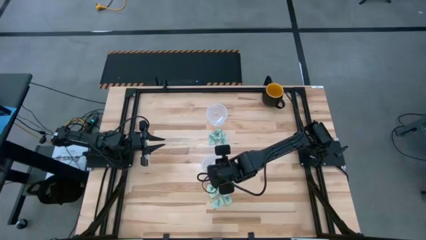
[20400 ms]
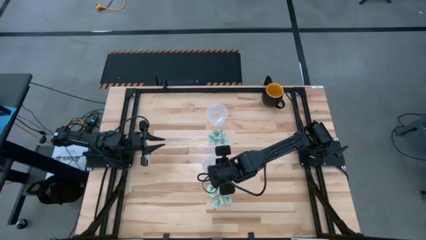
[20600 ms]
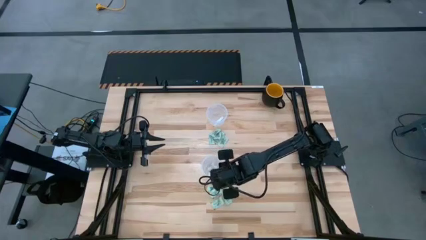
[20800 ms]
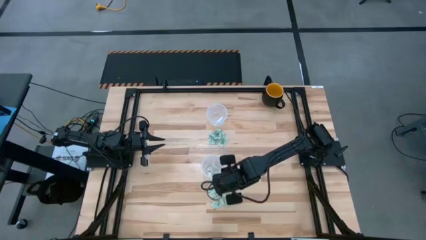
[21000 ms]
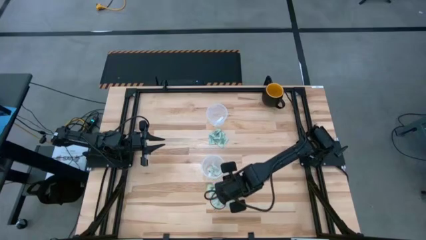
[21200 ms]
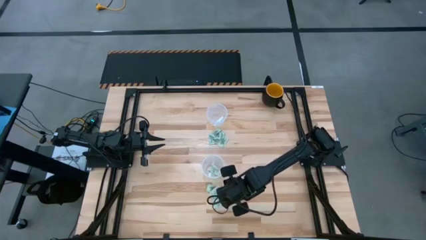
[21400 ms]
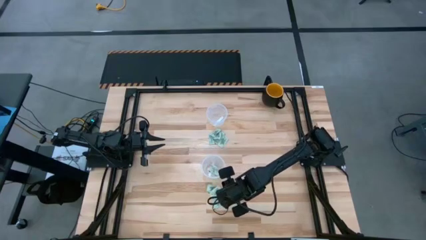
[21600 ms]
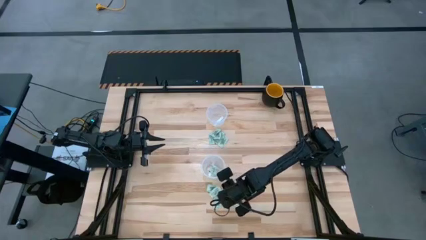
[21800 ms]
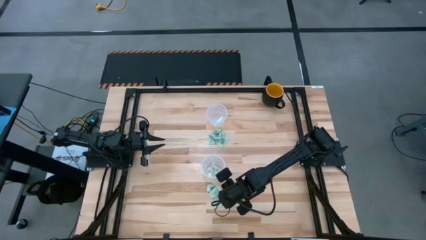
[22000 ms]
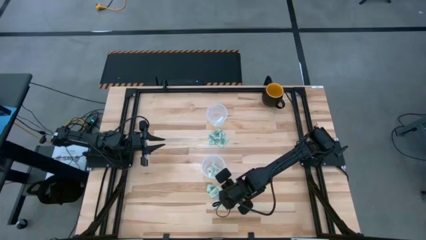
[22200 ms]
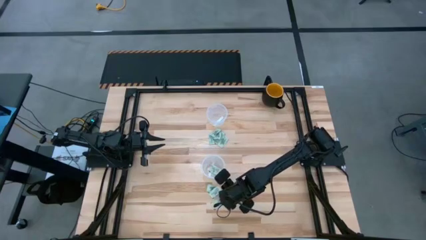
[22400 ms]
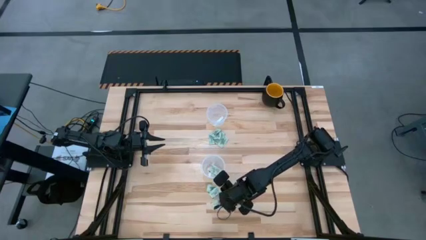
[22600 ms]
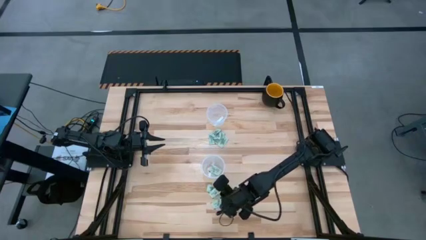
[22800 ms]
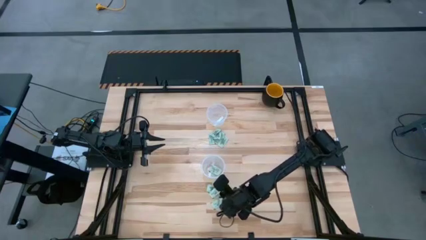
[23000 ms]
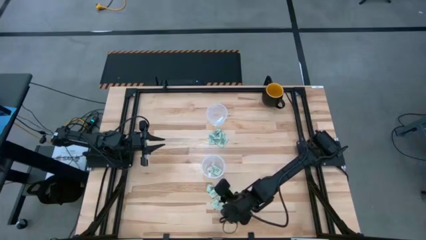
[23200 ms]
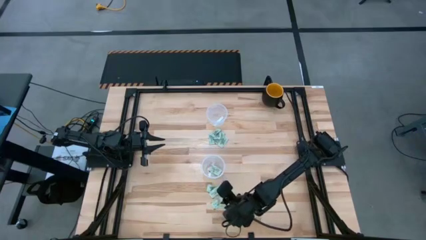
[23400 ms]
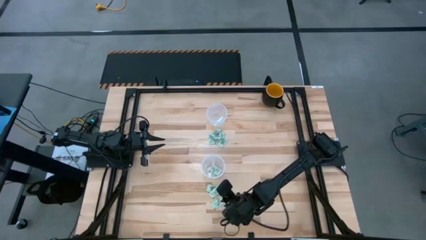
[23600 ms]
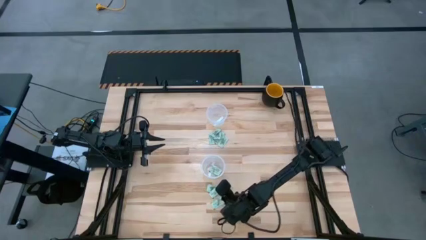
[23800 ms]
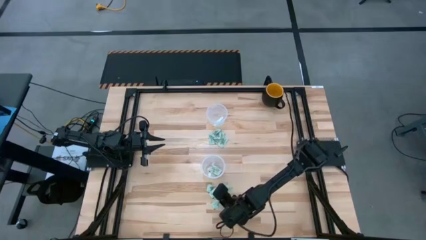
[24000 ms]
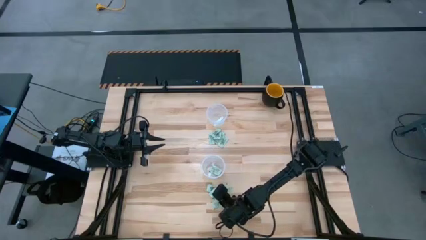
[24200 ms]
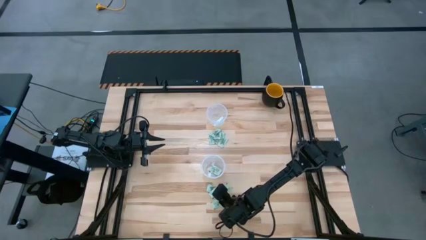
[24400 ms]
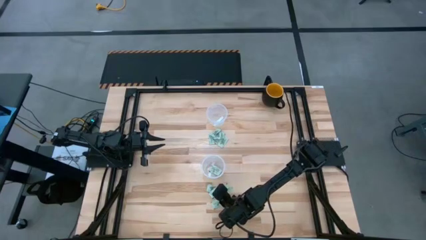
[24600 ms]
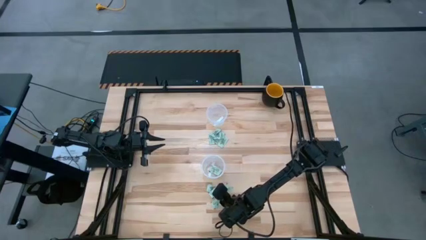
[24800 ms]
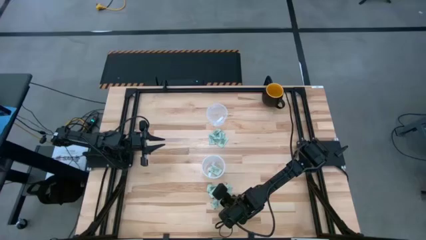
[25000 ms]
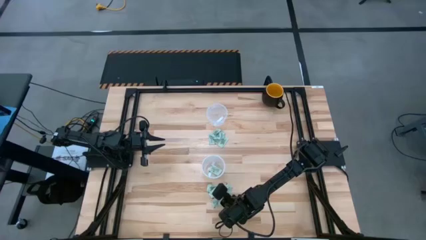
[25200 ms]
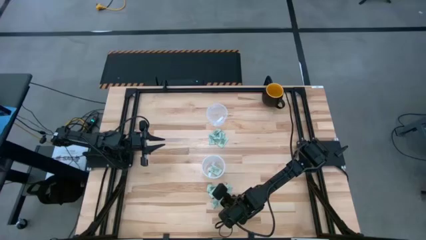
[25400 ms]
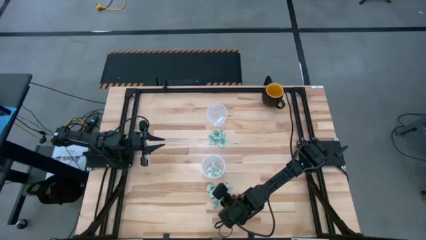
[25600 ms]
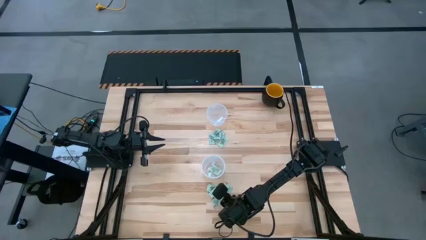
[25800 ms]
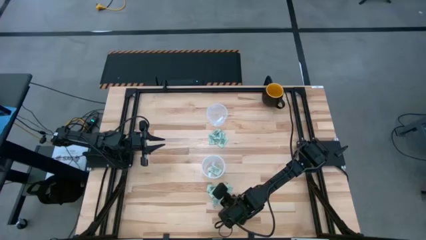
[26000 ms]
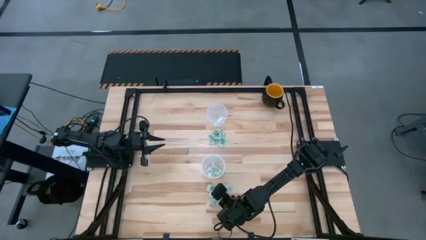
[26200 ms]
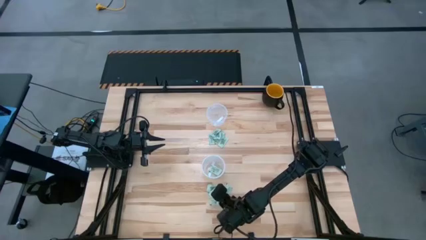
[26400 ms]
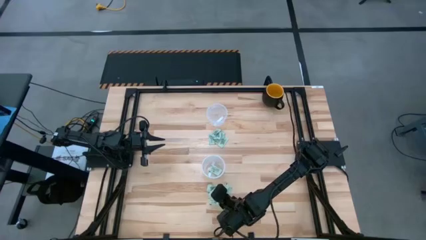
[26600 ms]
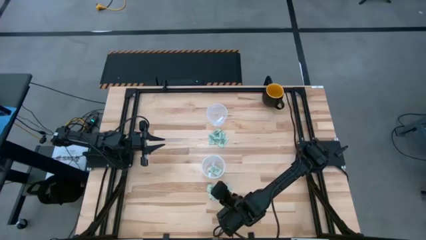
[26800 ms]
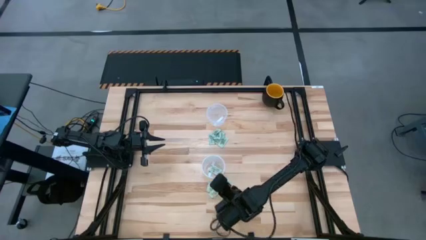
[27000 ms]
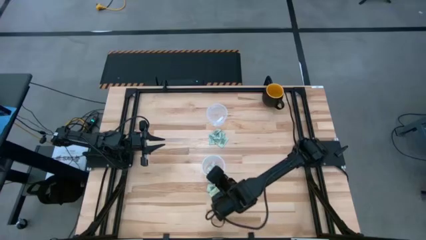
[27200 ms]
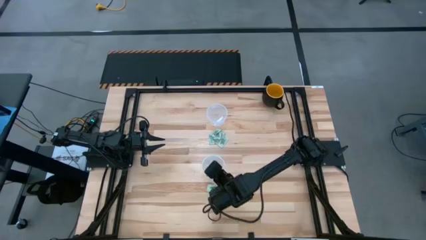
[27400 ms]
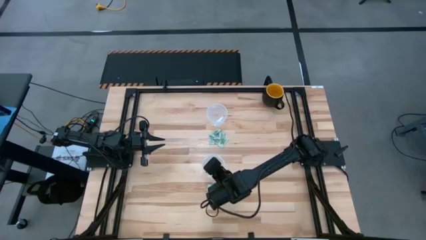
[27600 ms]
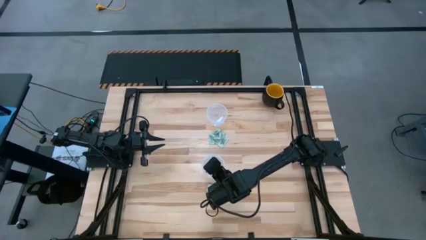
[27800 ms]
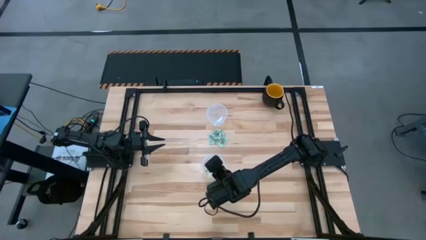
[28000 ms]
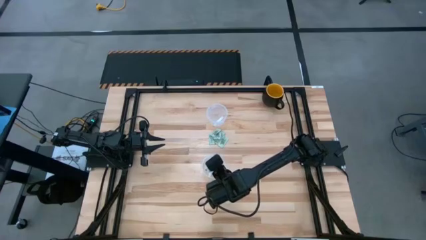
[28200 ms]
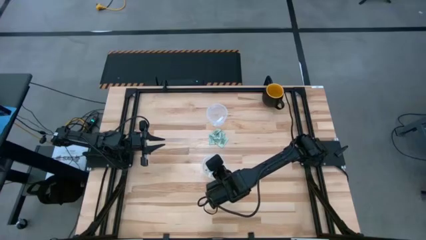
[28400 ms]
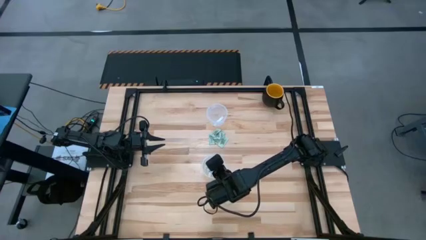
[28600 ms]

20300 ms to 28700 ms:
Task: Pick and place items into bin
Put the bottom right stevia packet into the bottom bin

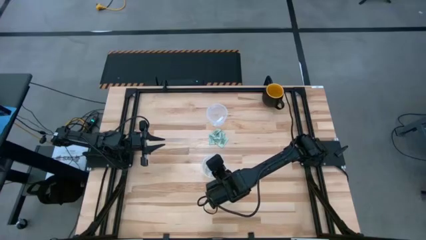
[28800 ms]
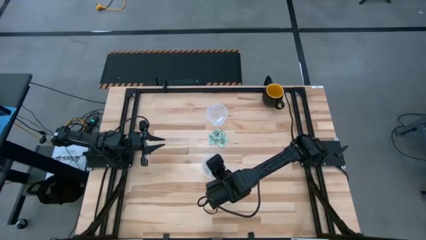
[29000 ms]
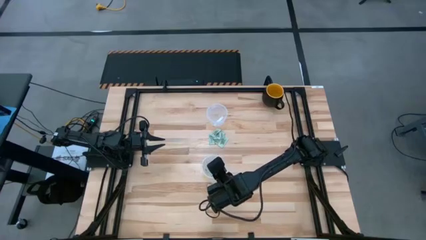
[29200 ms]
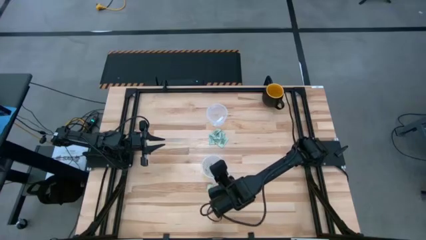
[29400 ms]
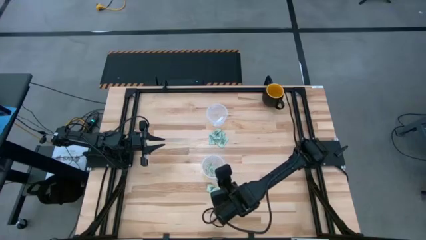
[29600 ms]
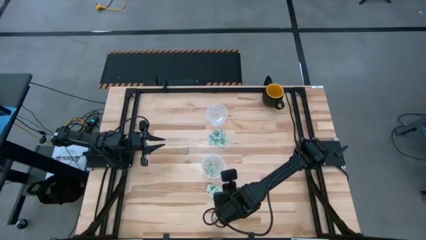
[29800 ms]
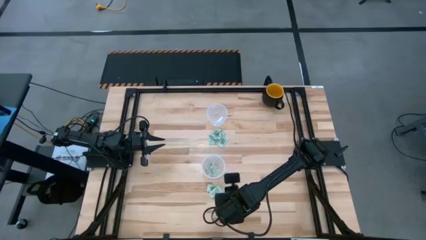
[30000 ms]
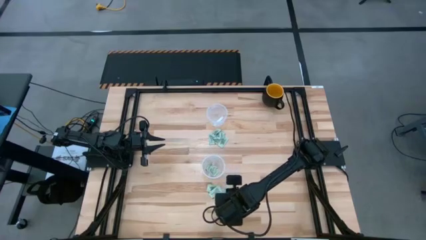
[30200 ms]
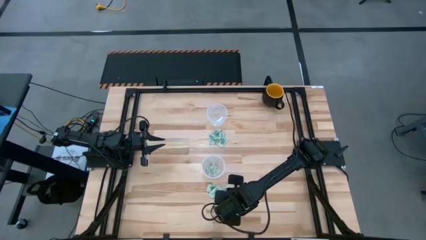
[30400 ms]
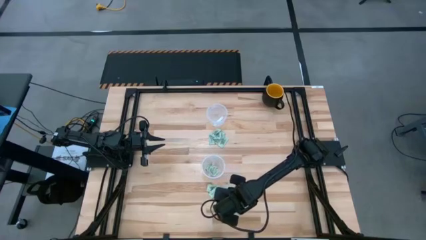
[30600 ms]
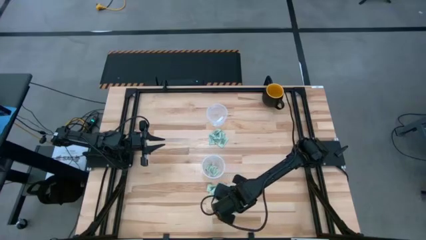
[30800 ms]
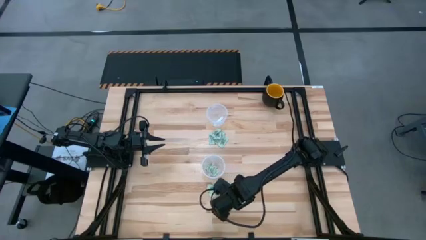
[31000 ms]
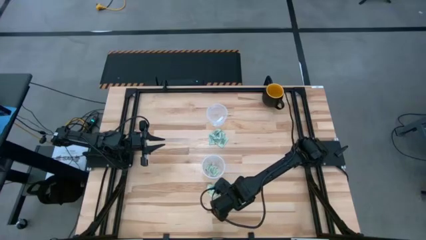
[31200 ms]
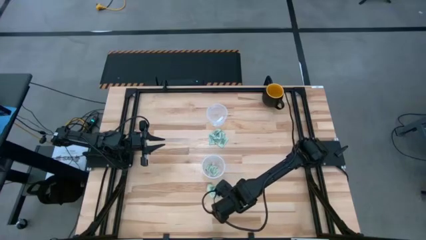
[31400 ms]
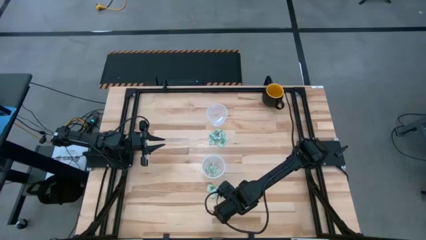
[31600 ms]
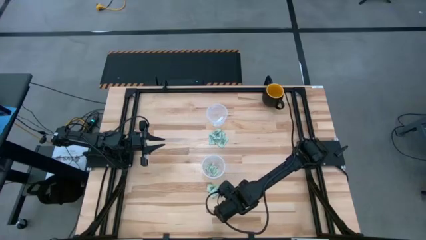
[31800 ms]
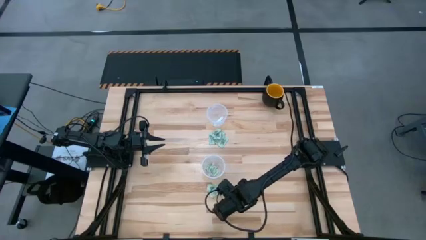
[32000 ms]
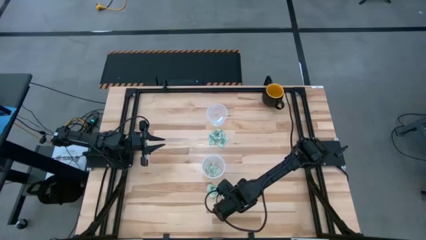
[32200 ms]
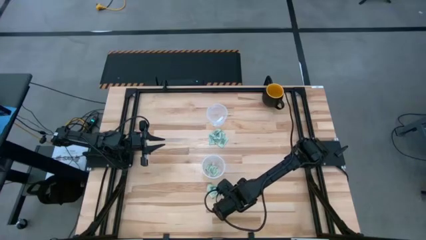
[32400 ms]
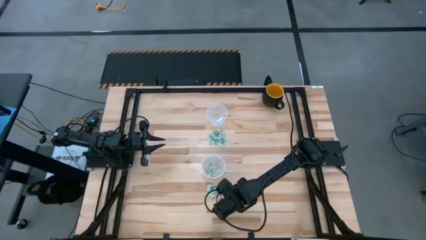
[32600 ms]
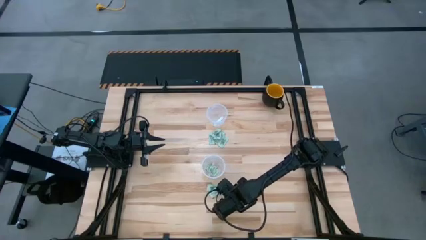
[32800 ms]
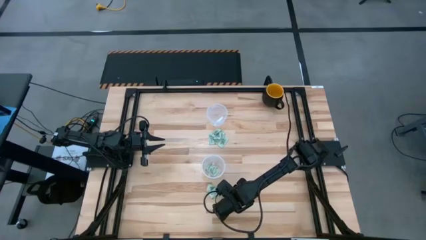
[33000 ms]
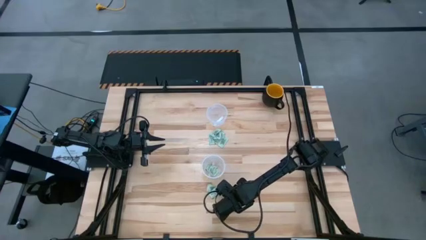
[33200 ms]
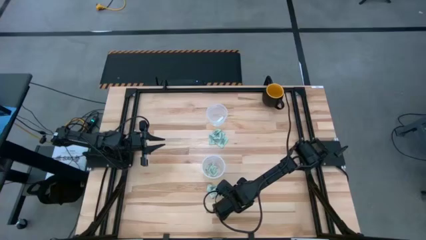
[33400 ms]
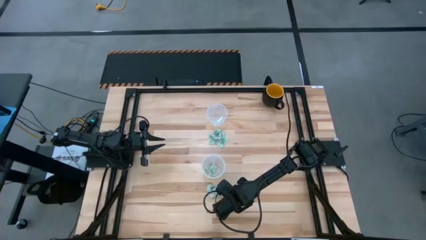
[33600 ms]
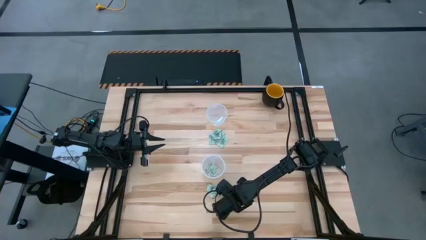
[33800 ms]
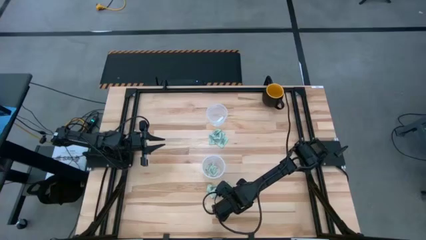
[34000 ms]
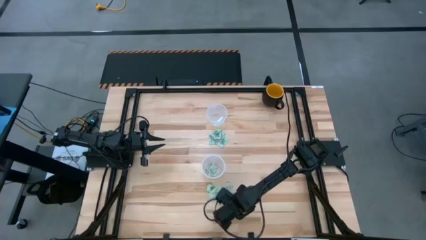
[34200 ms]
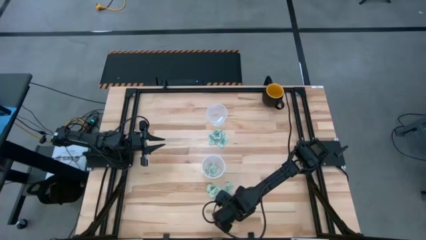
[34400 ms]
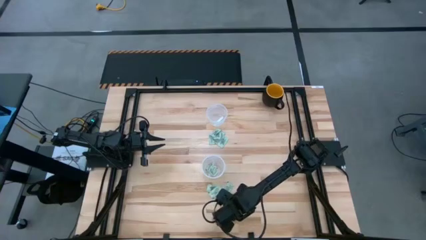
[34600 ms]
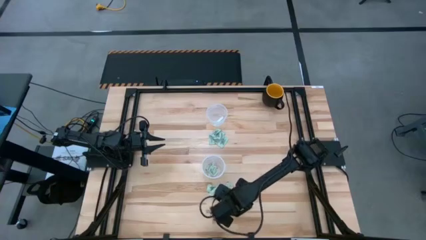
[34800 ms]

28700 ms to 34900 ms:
Put the bottom right stevia packet into the bottom bin

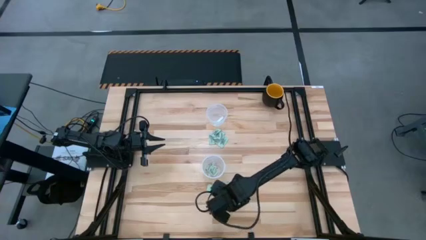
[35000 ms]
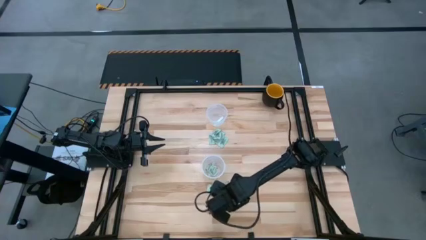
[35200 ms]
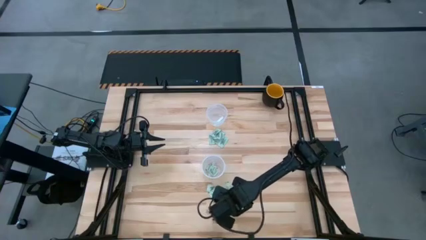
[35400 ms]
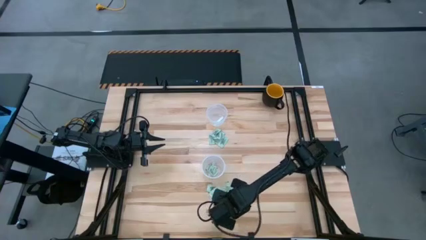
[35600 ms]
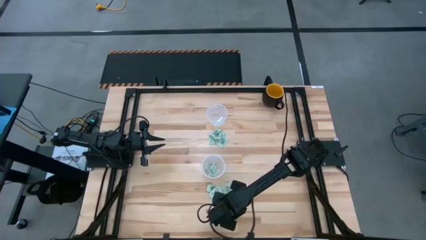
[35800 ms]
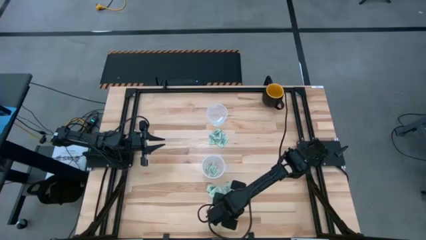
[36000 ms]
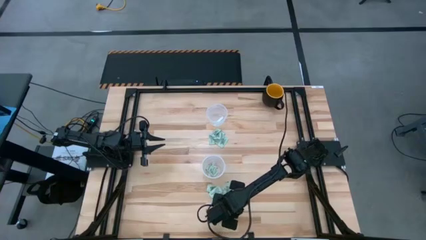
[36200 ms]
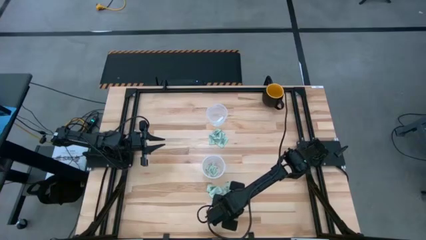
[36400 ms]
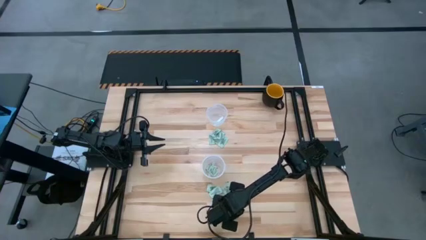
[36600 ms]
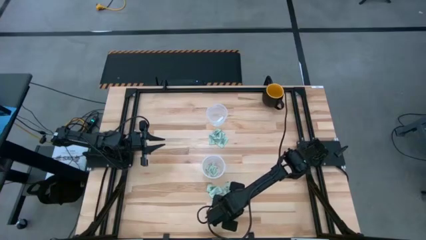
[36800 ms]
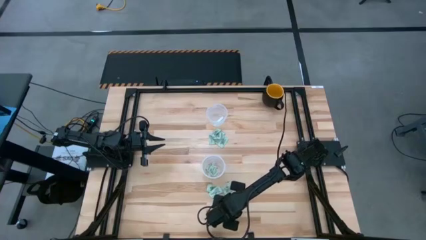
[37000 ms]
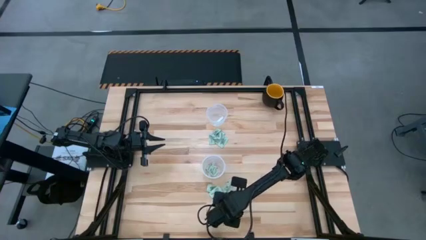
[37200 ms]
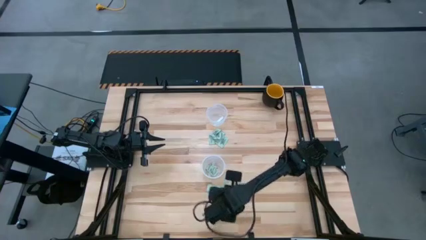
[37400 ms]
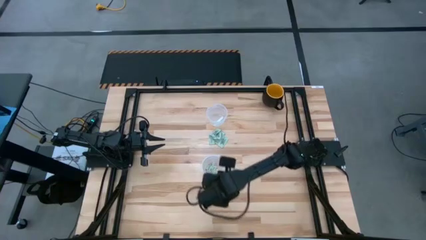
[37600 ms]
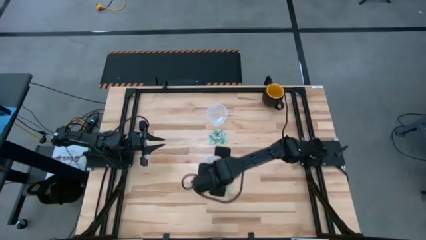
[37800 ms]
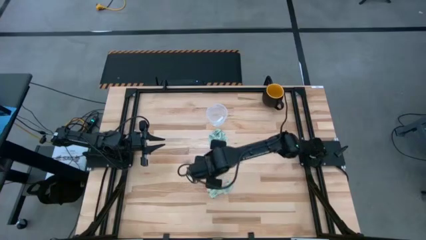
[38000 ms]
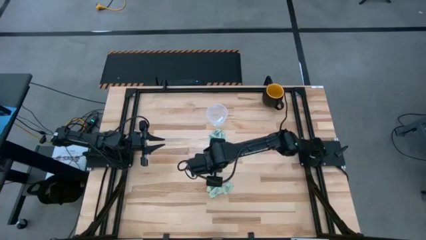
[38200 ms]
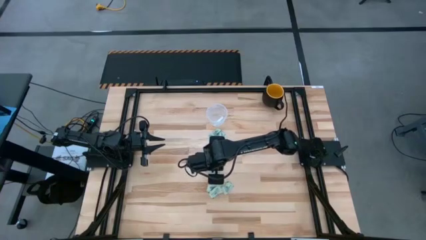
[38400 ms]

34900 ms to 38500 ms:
Put the bottom right stevia packet into the bottom bin
